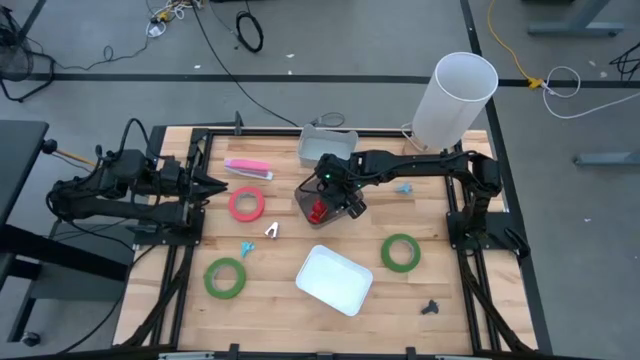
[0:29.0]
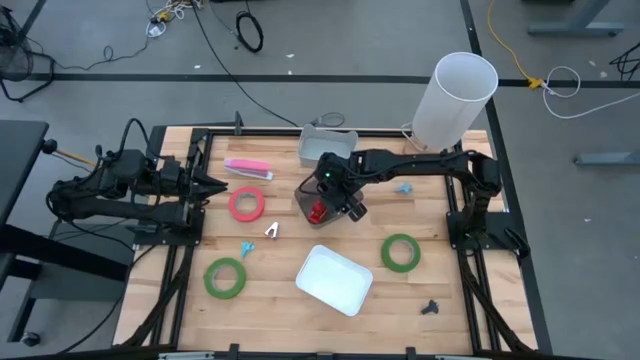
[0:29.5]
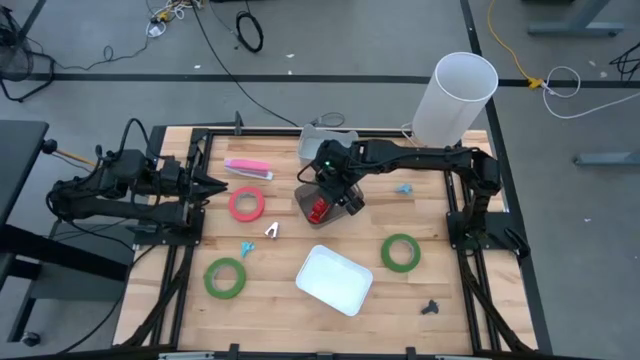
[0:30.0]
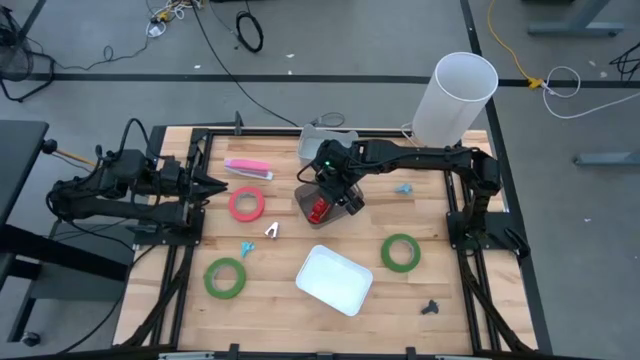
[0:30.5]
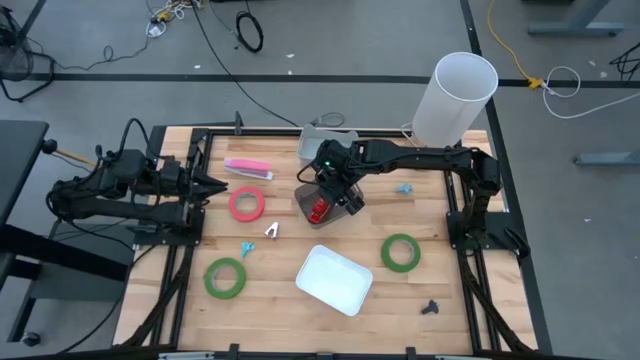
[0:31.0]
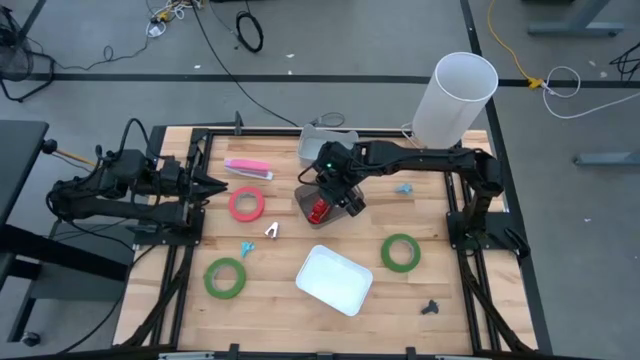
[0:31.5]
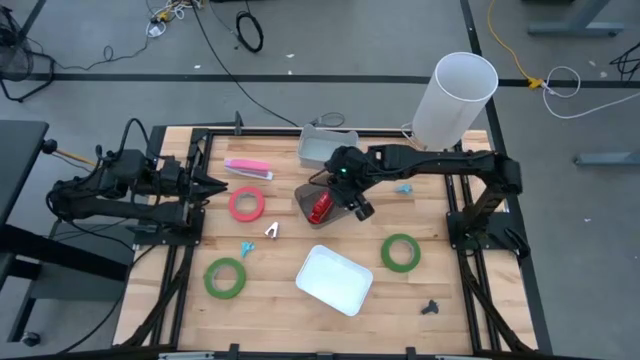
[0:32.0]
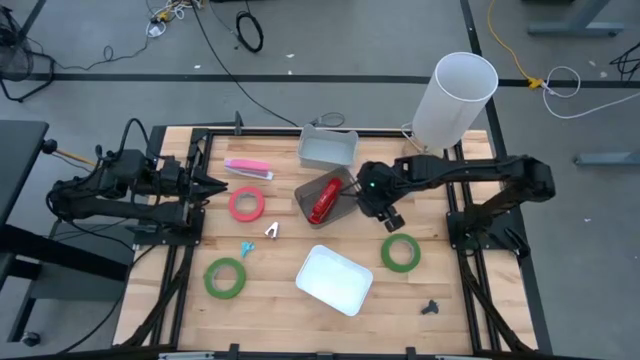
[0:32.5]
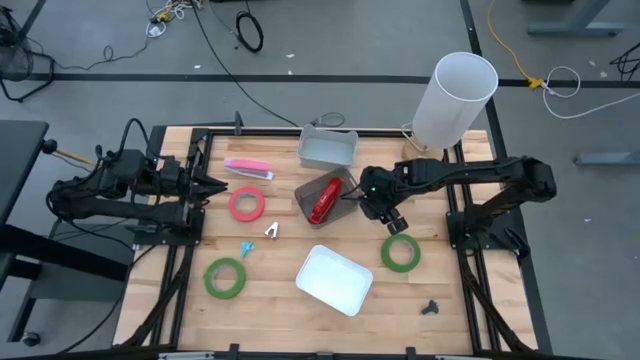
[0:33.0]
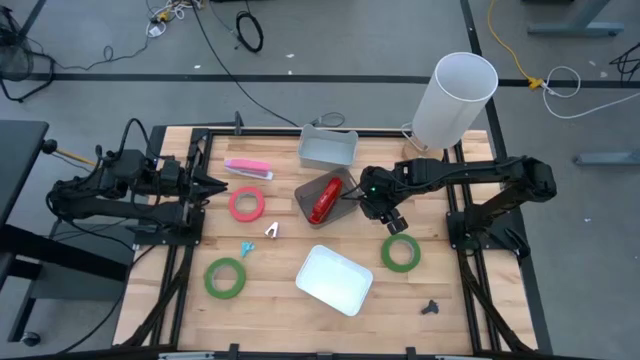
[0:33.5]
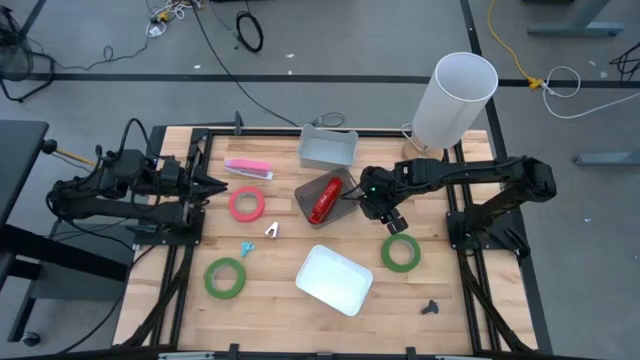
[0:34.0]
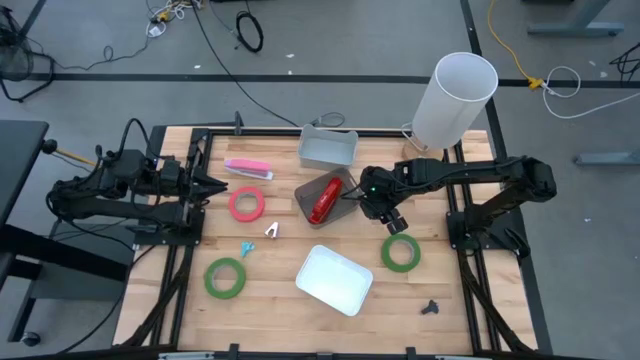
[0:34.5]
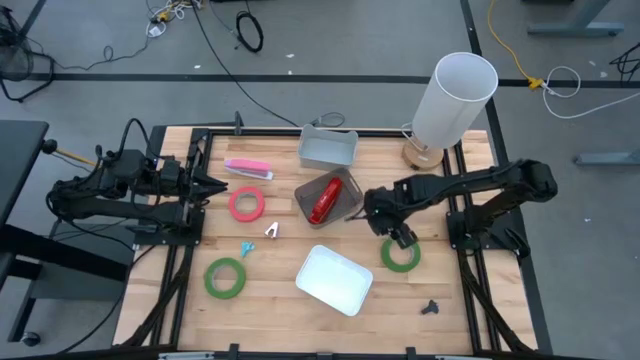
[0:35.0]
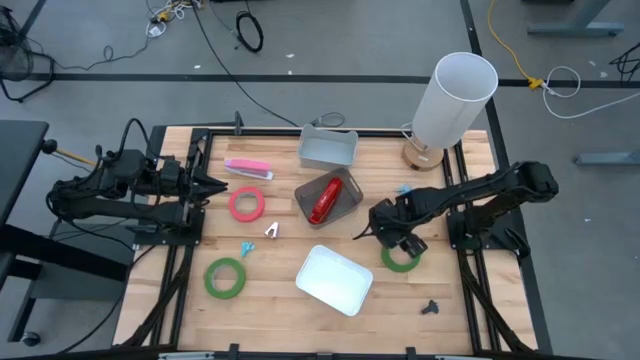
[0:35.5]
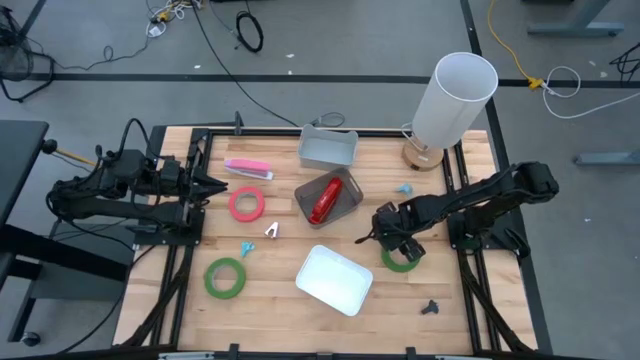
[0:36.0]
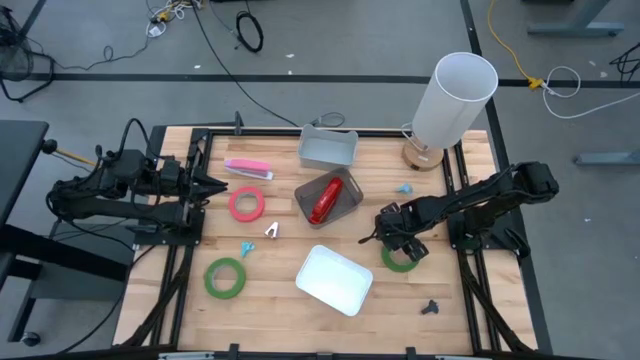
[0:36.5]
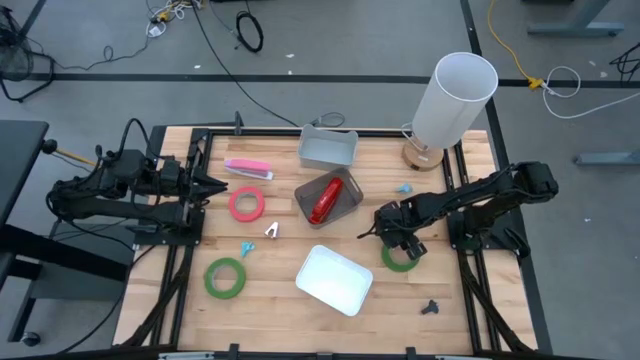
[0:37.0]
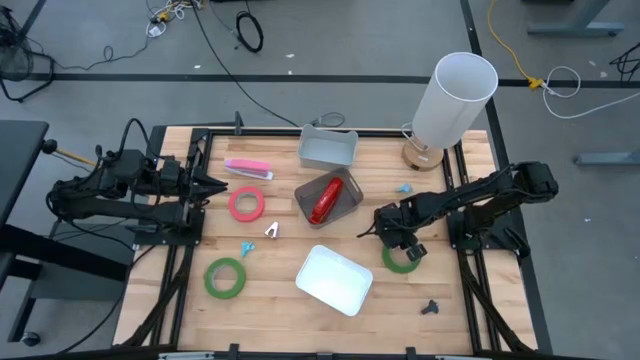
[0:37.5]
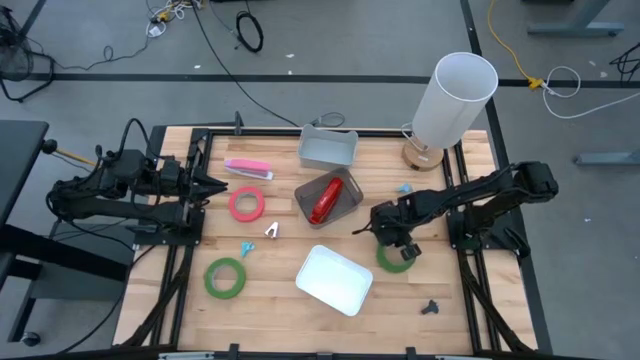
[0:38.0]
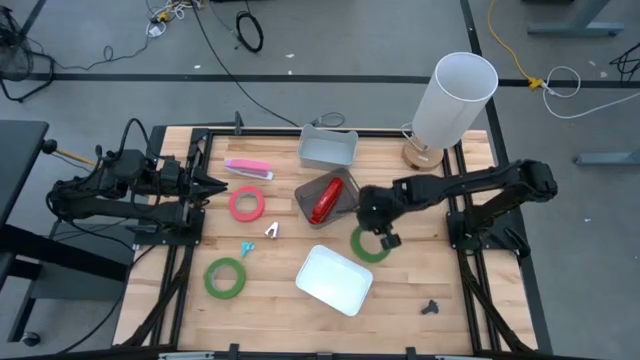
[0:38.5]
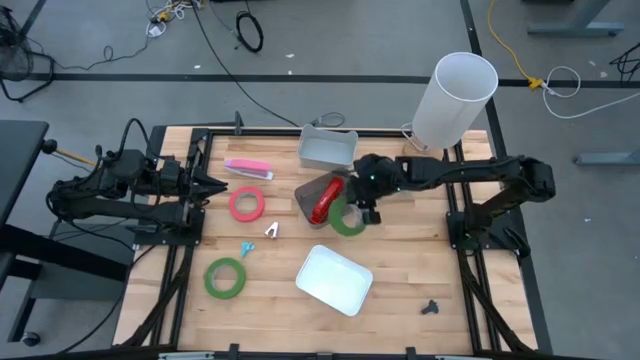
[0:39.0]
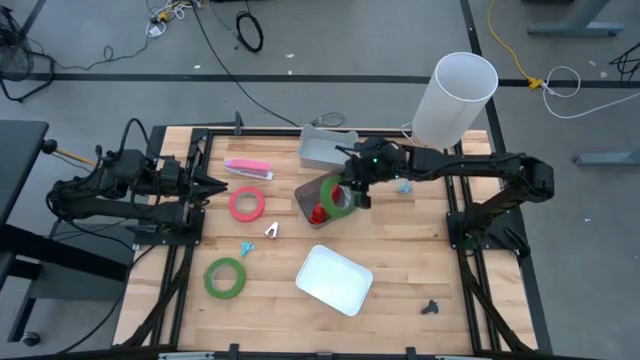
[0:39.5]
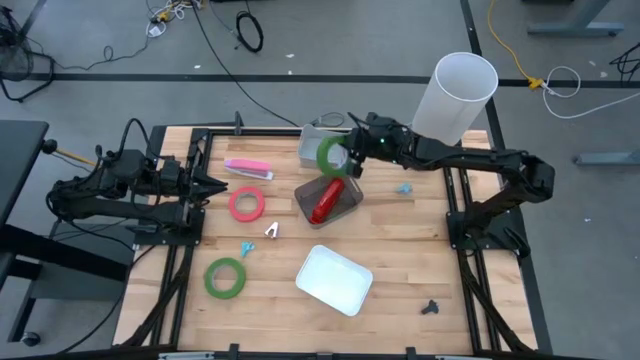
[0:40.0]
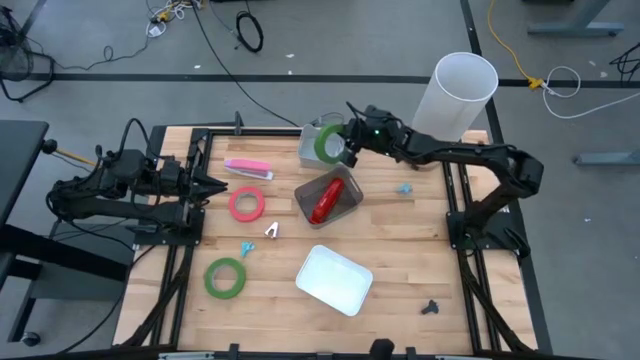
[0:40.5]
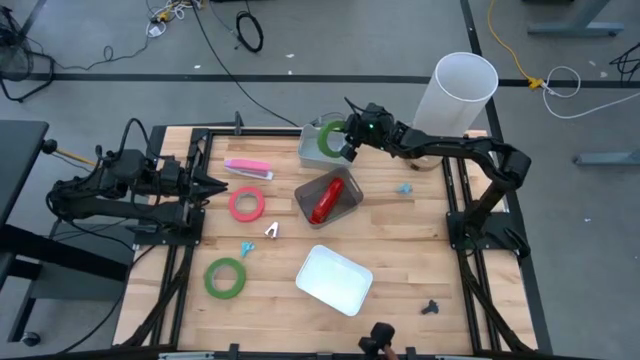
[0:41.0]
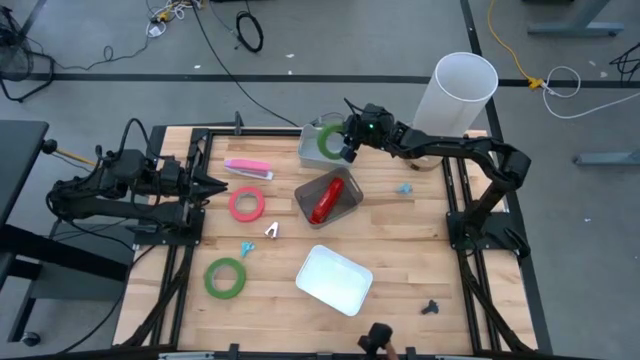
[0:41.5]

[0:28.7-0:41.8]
Task: Pick and place Stapler, Stapler remover, tape
Put the top green tape into the gray bin

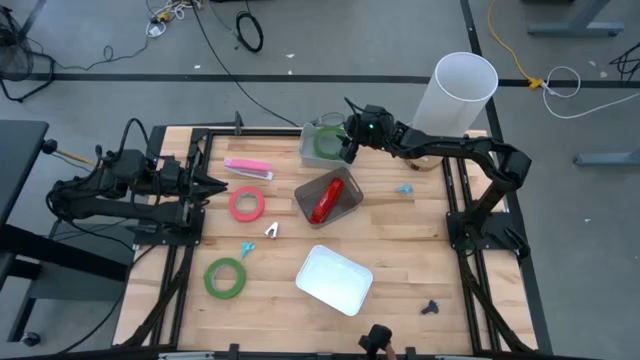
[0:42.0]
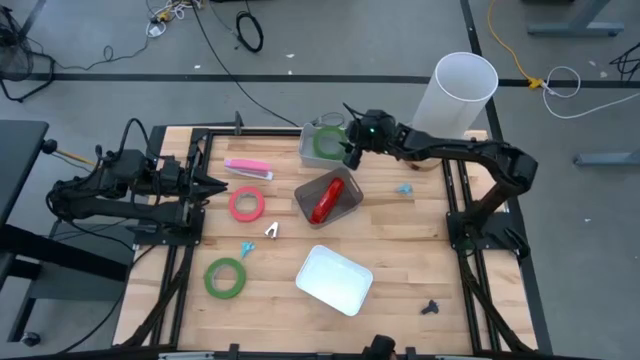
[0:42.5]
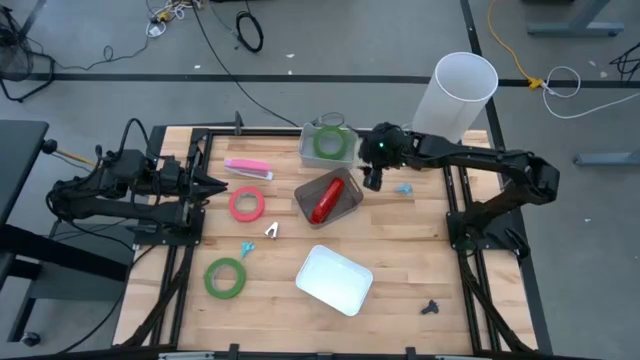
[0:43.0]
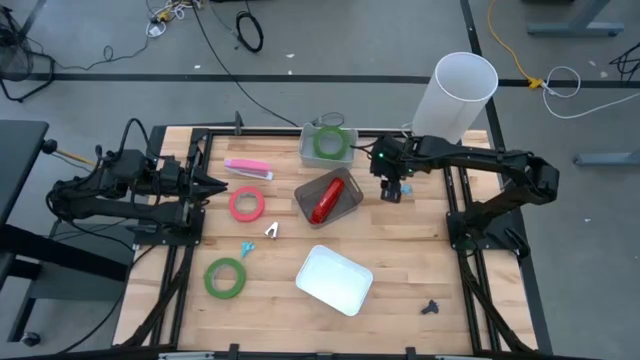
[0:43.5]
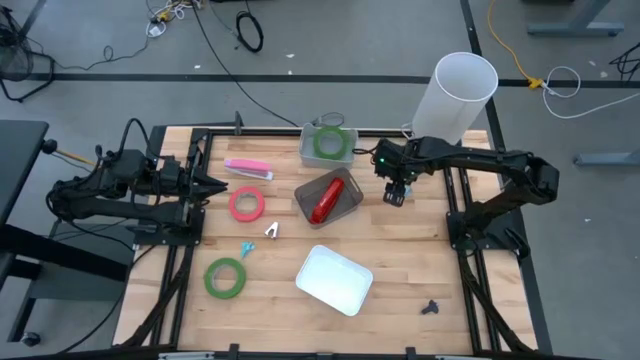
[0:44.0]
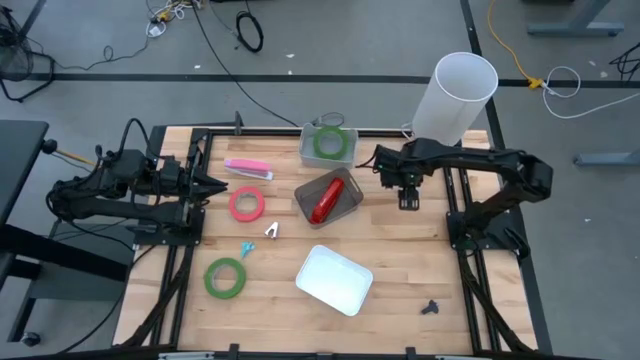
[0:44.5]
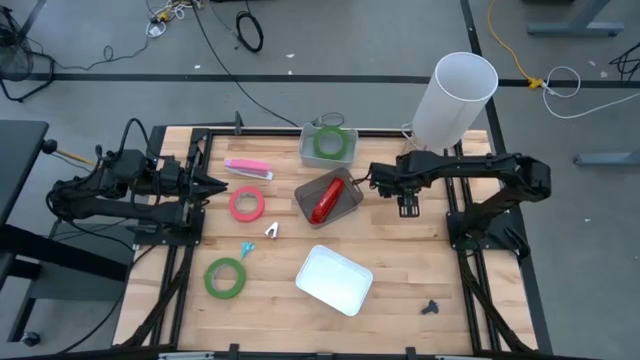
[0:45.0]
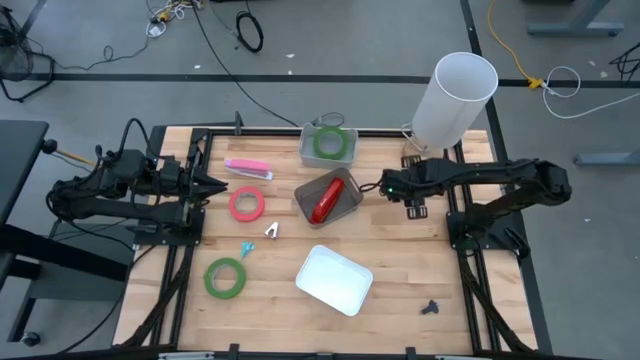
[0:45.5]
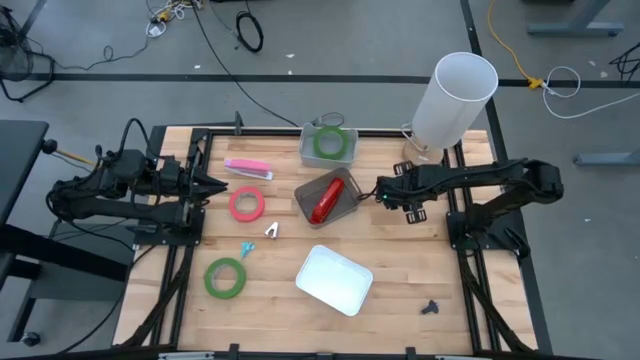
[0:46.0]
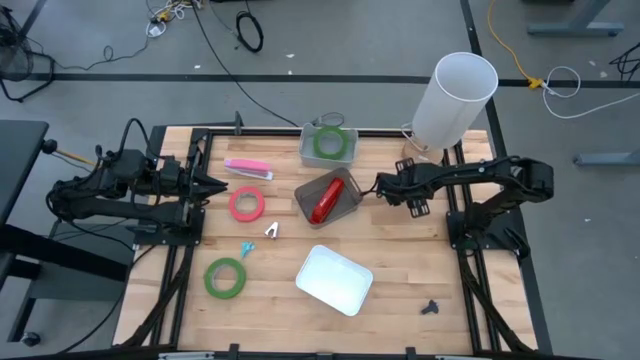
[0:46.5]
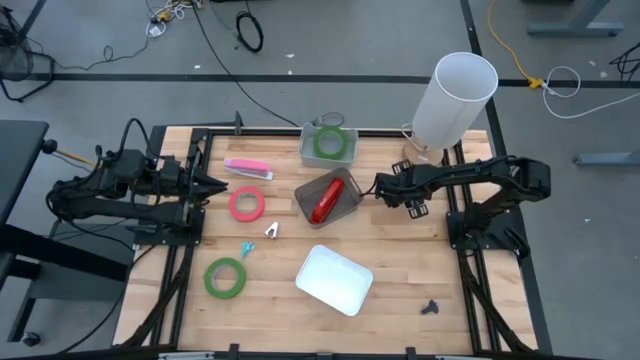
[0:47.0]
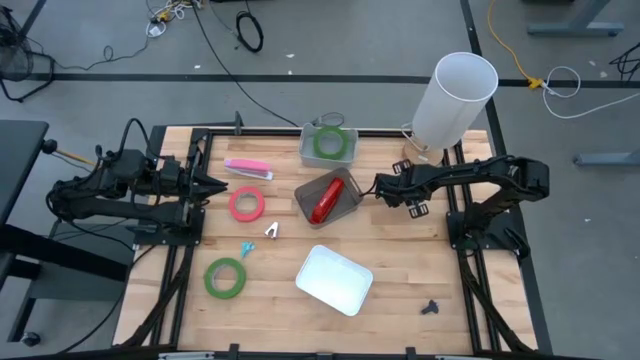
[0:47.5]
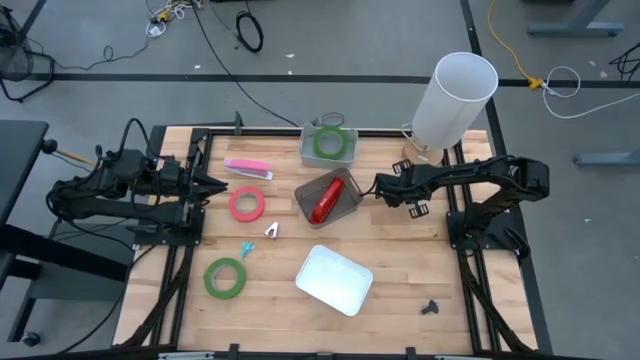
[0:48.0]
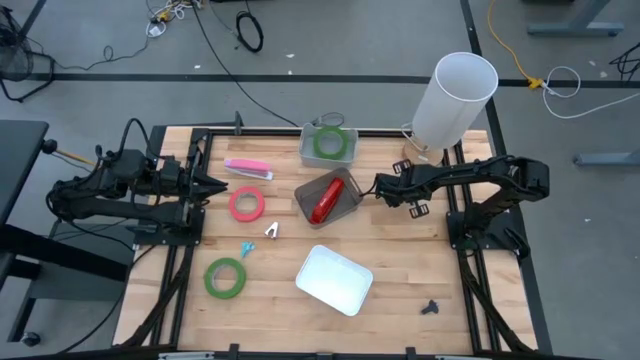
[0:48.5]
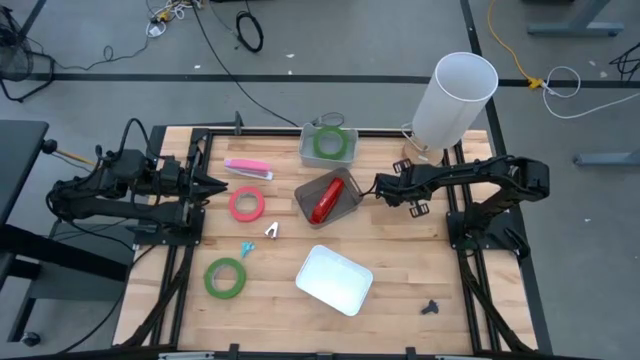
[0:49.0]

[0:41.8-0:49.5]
Put the top light blue staple remover into the white bin

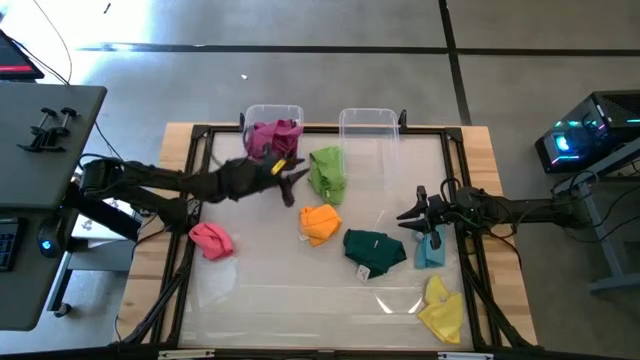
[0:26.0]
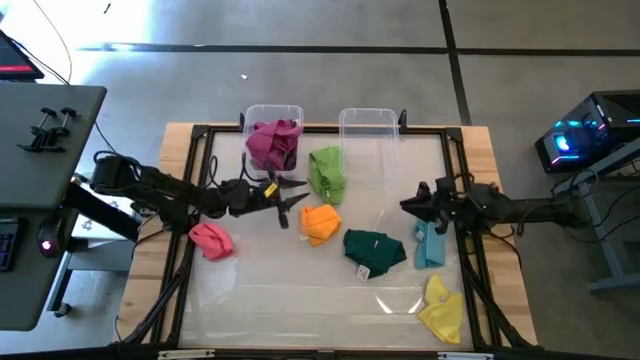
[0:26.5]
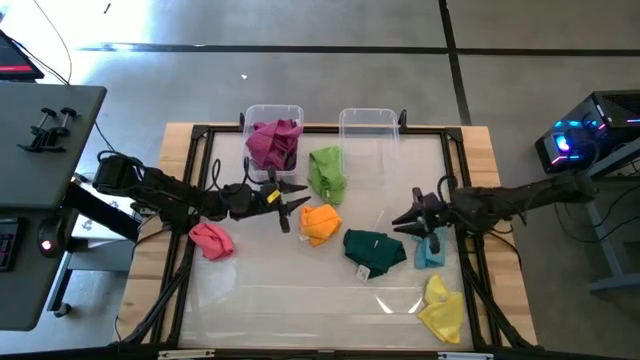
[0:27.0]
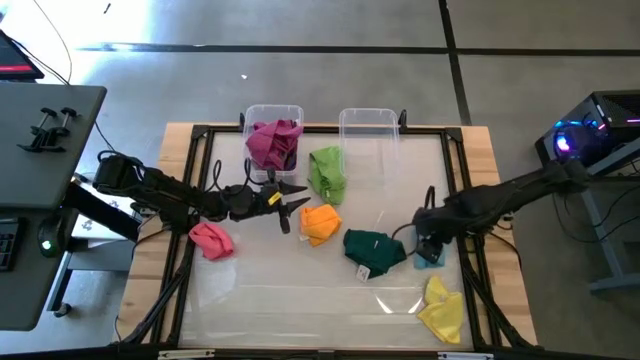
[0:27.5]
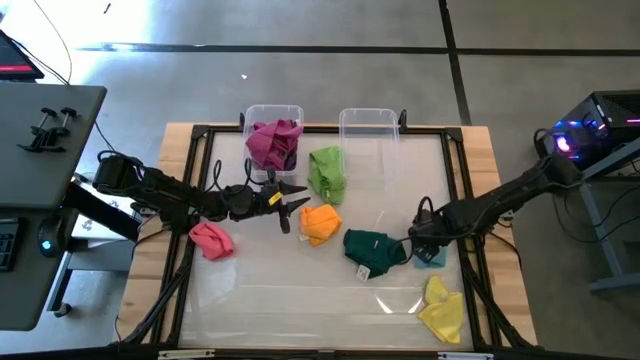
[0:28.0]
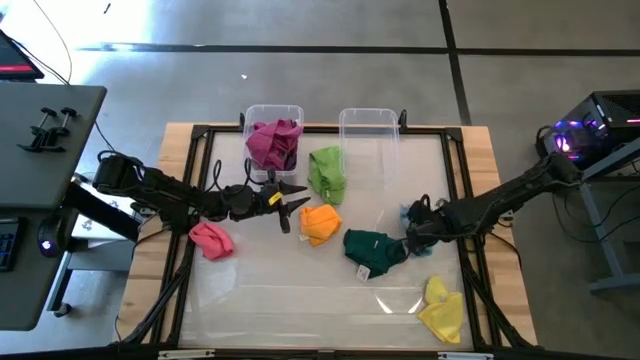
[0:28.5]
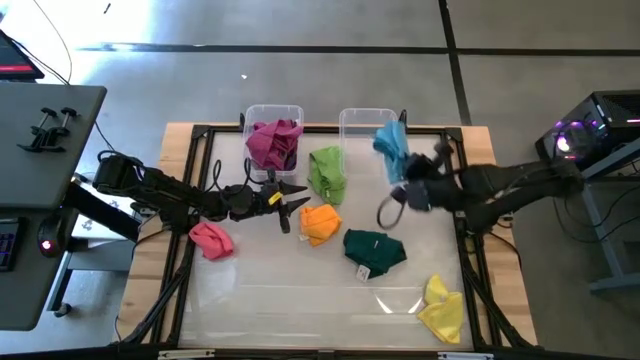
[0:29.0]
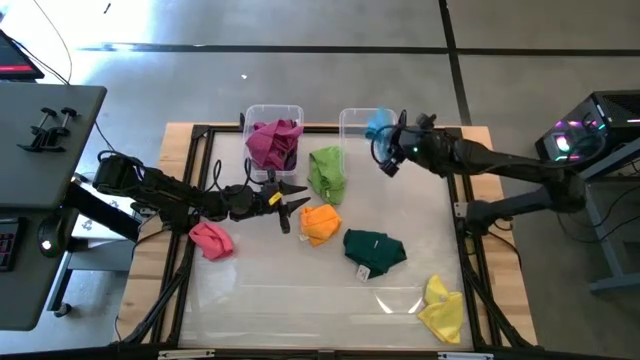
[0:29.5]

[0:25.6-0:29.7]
Task: Sort towels by color in basket
Put the light blue microfiber cloth into the right transparent bin
